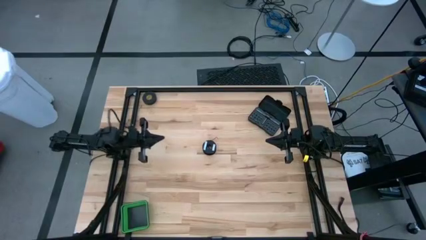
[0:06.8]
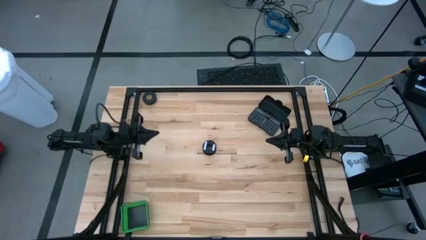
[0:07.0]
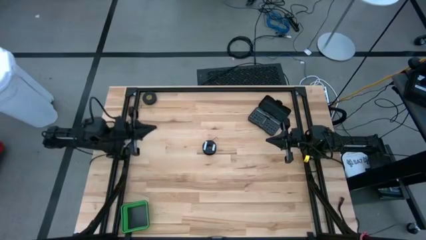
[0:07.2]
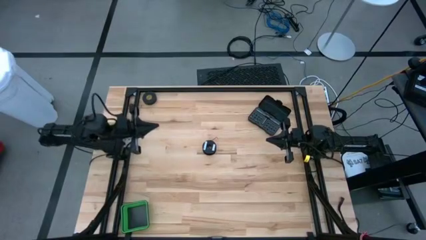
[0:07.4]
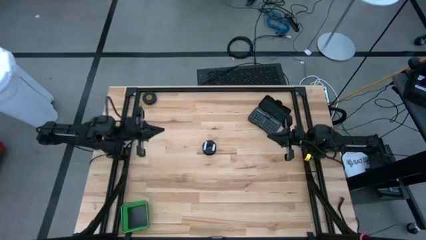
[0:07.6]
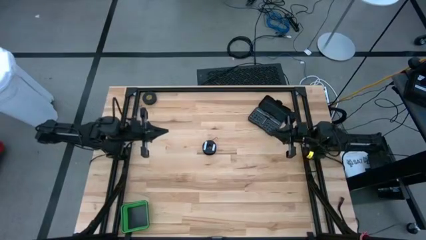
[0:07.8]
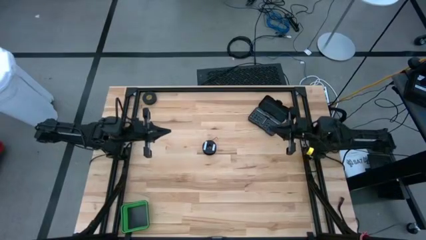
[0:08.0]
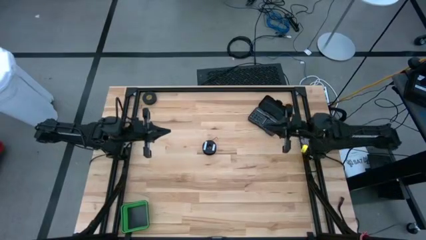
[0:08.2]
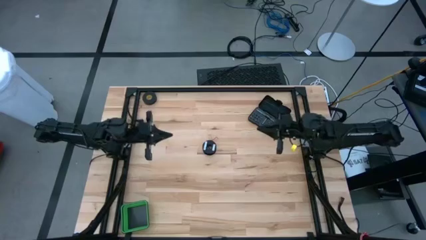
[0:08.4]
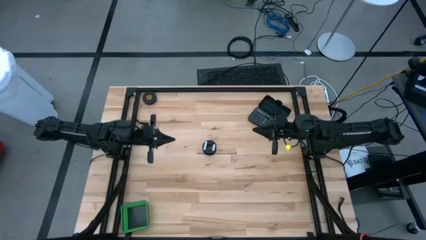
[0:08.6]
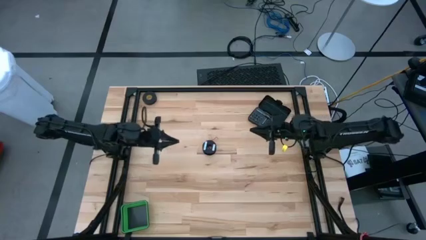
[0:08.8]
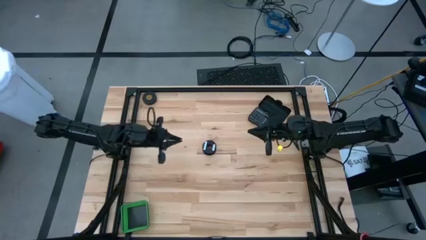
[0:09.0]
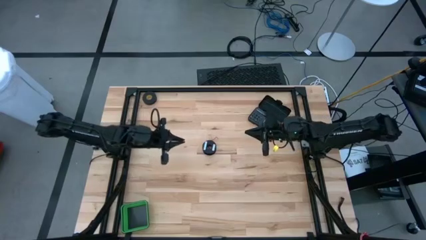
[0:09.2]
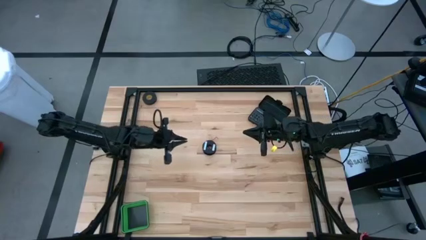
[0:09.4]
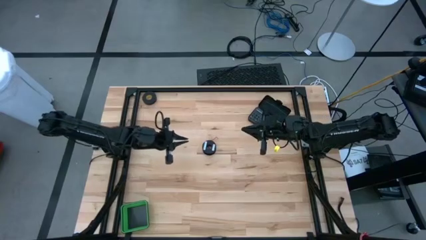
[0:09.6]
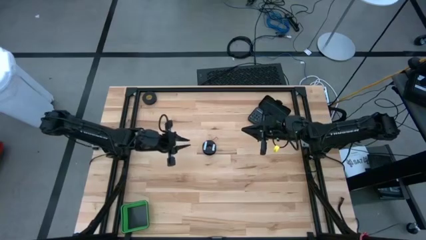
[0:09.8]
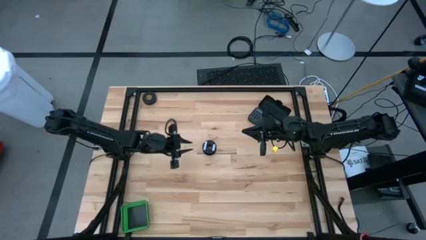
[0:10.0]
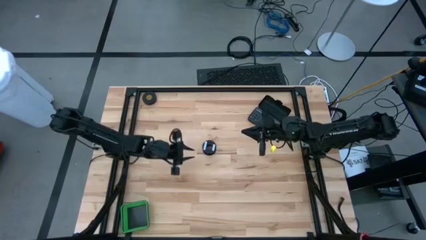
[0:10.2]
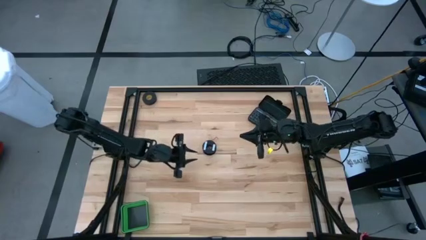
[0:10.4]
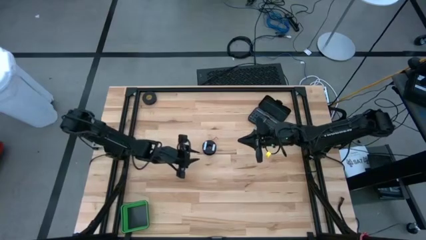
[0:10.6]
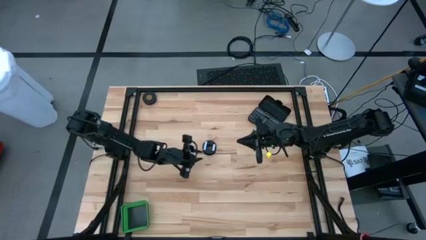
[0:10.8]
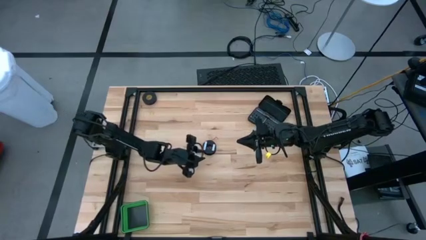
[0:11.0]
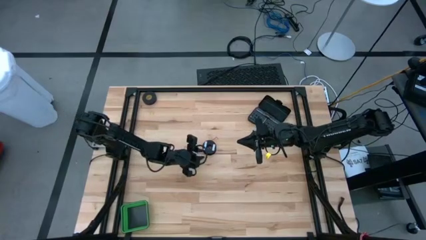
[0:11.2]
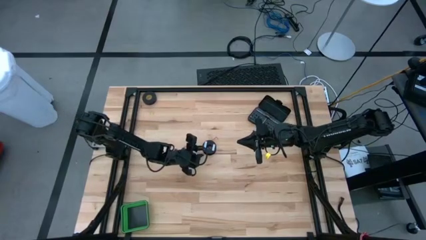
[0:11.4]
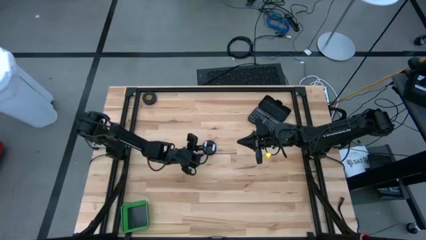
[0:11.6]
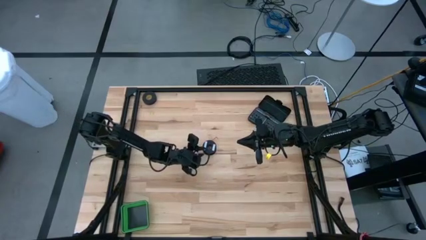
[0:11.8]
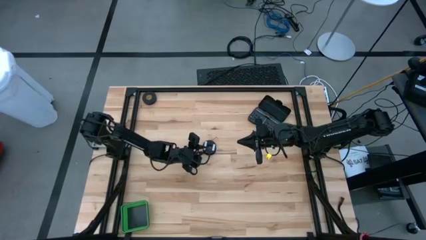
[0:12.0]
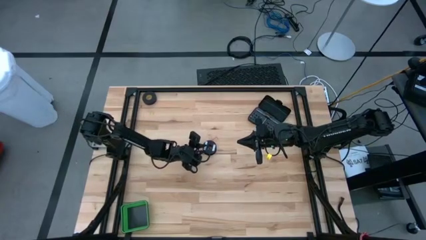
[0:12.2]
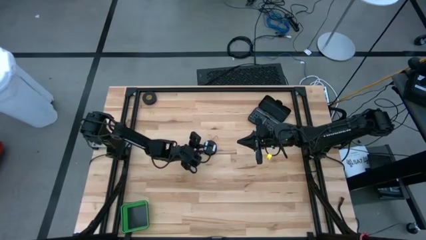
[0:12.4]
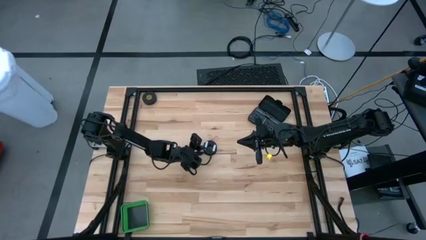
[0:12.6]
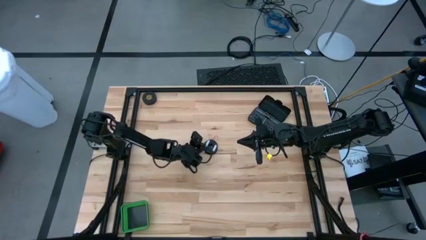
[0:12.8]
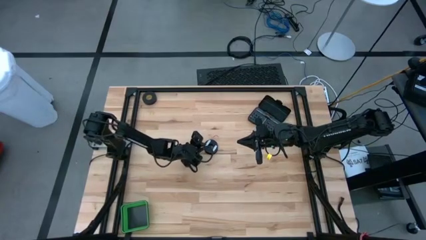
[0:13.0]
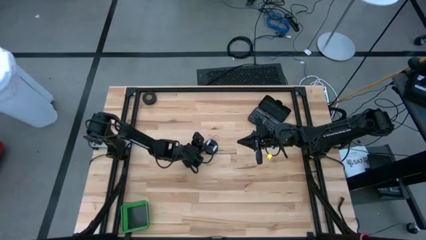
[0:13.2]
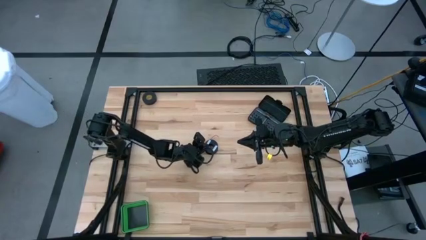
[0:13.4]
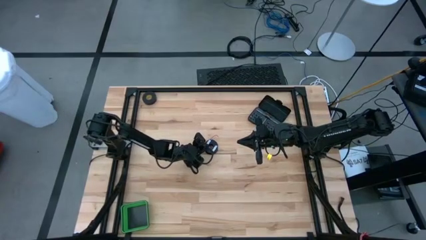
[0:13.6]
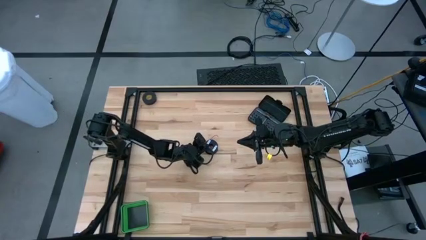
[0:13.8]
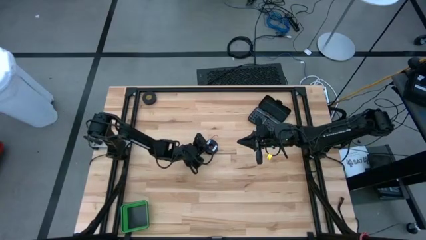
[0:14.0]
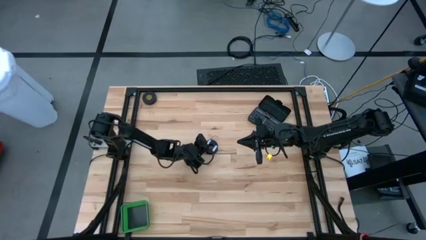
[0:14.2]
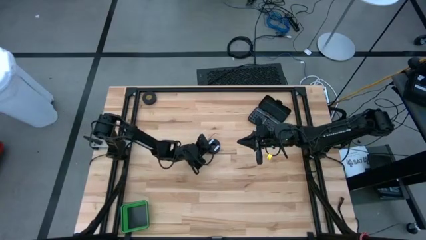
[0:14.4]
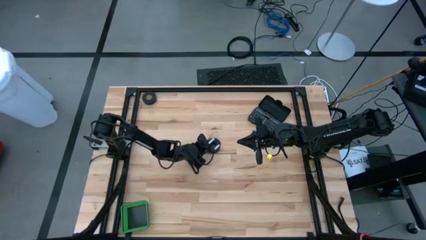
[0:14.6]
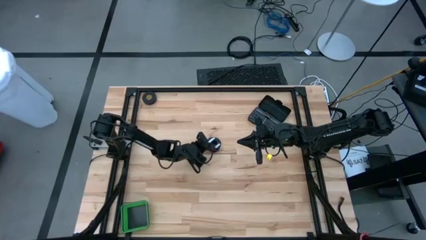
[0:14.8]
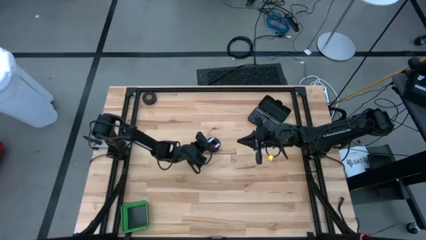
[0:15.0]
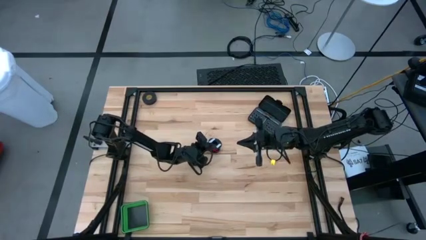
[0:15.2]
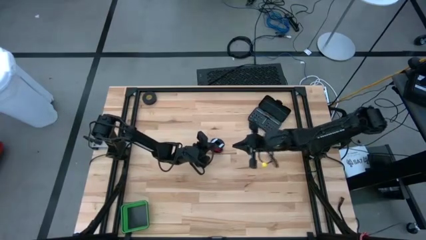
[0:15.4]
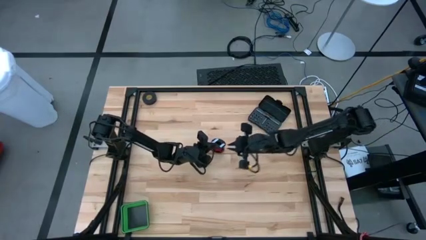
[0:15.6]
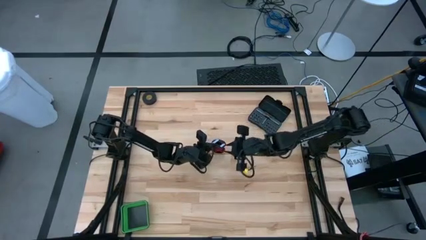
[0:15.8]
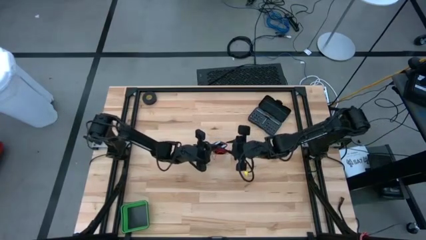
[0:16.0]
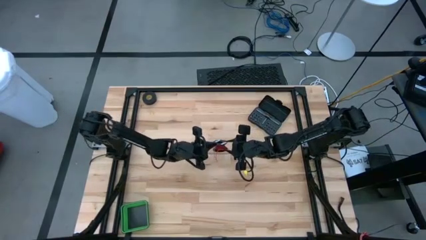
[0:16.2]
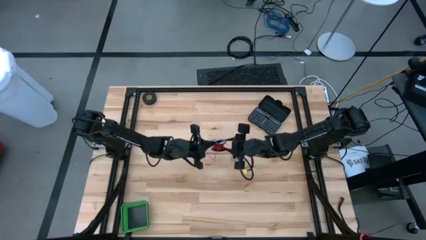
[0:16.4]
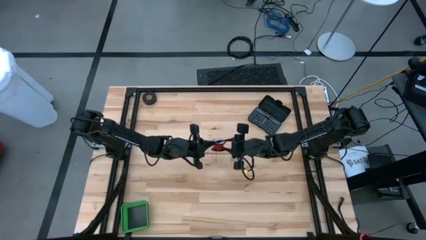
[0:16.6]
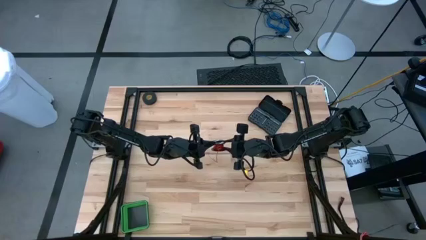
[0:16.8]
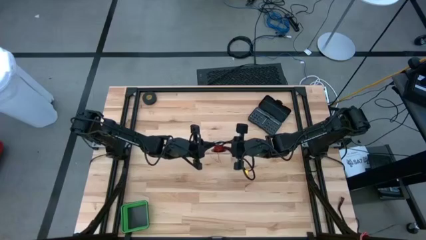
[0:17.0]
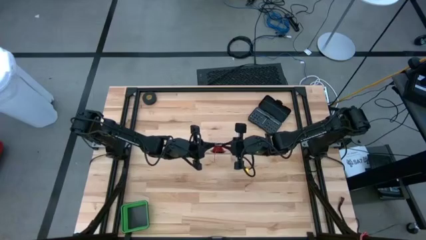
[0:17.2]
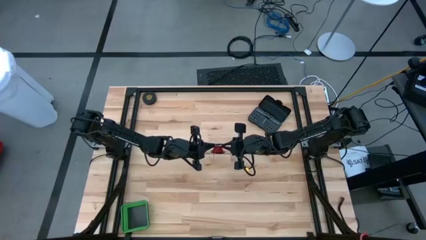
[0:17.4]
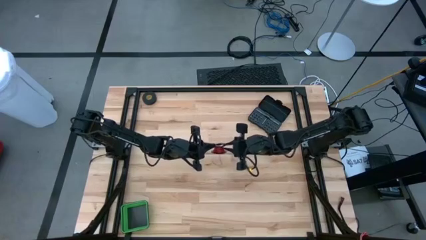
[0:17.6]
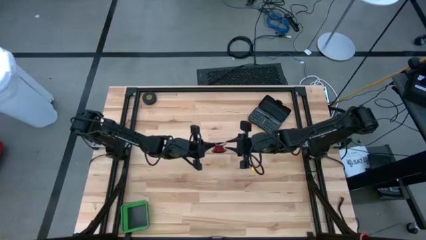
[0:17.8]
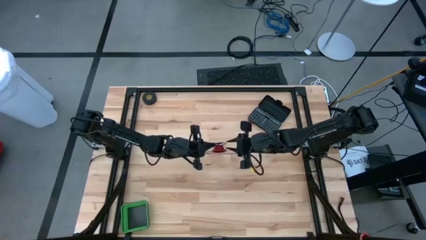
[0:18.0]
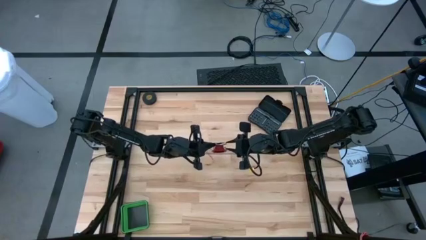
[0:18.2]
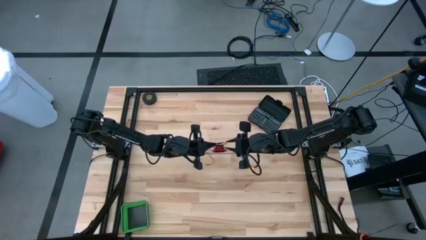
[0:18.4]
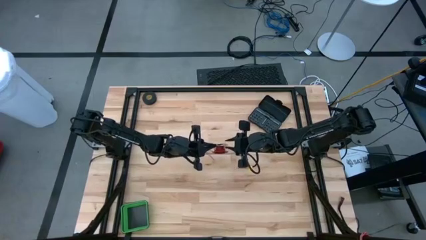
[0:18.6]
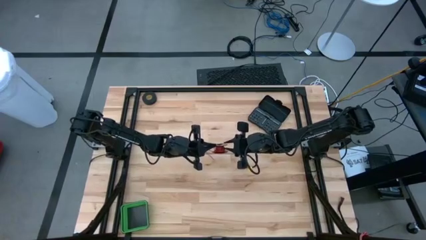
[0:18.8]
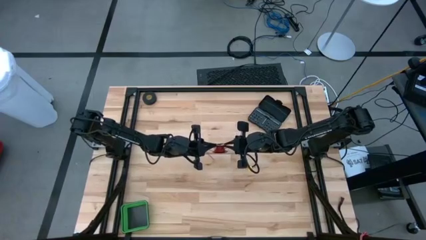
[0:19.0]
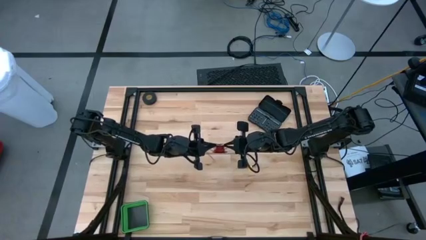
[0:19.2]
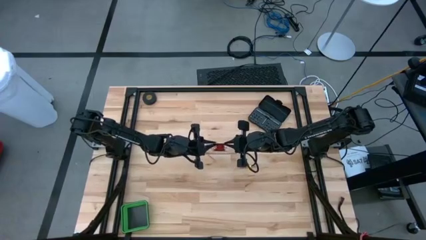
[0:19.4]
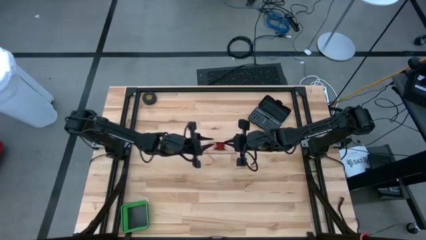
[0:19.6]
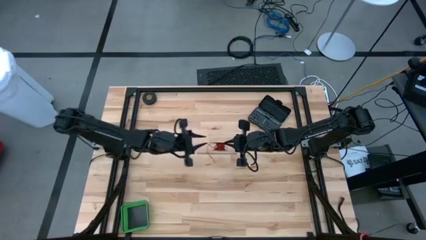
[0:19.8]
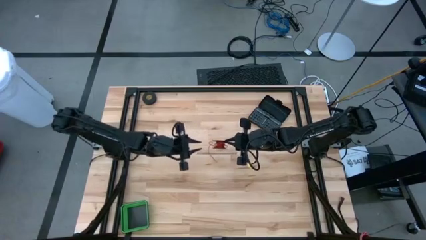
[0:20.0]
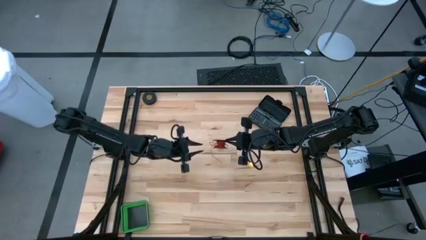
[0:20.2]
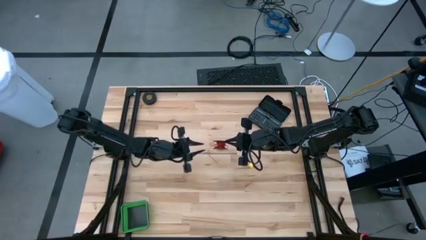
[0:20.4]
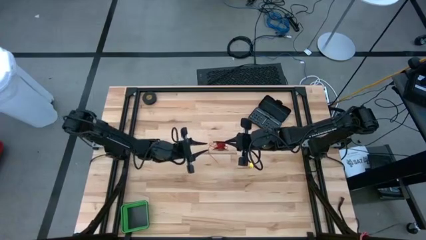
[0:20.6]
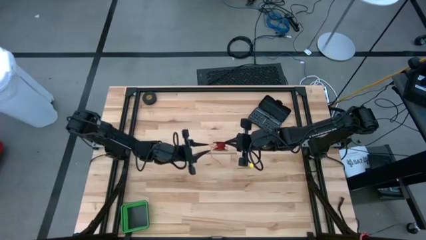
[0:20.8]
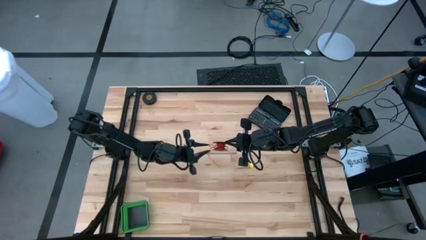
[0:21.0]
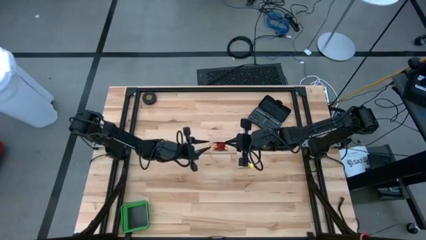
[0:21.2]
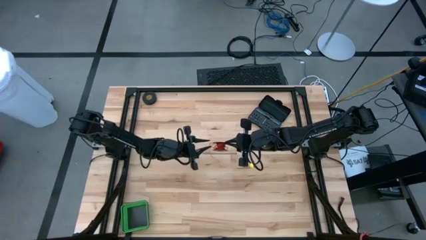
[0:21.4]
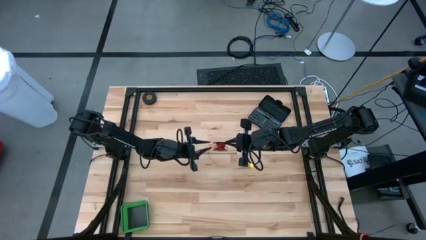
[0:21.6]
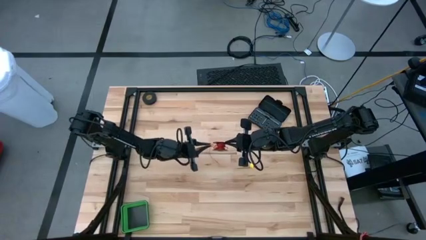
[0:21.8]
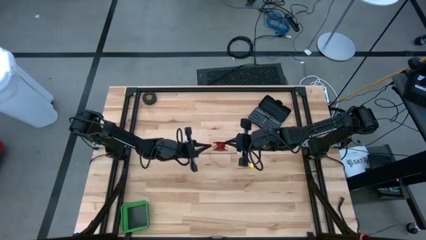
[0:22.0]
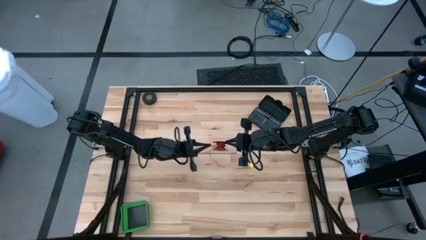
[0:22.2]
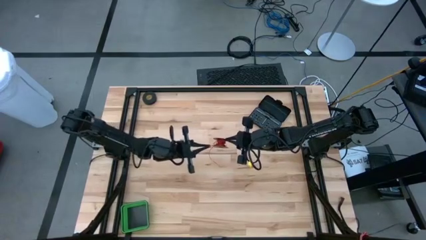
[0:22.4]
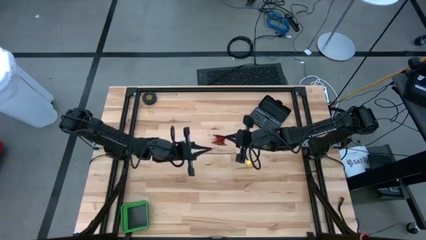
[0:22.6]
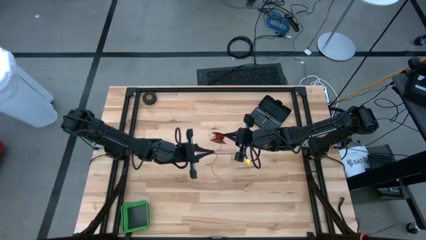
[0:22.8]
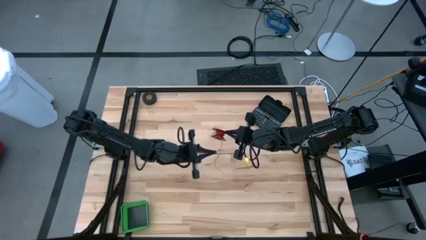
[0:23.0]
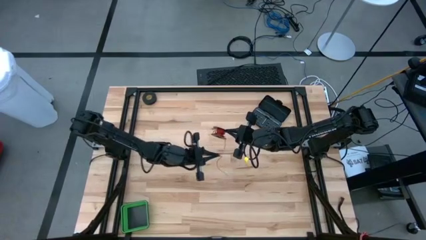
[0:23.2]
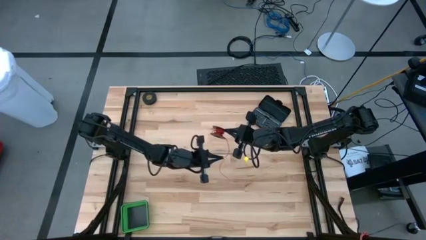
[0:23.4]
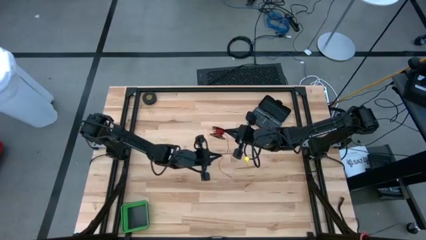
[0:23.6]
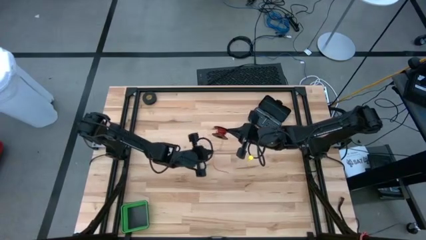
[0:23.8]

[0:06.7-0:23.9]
Task: Coil cords
Uncoil the red wire from the spool
